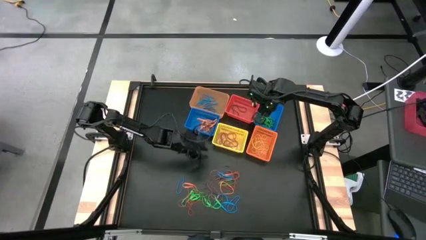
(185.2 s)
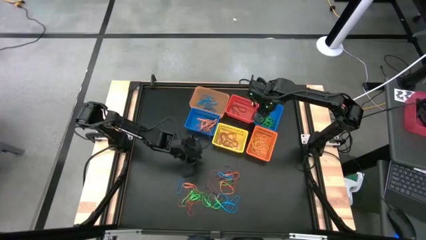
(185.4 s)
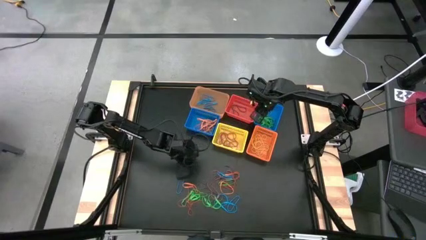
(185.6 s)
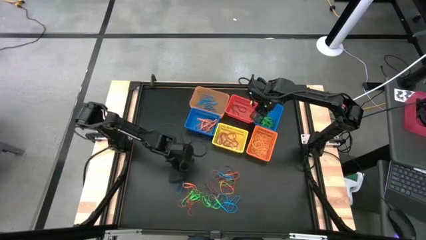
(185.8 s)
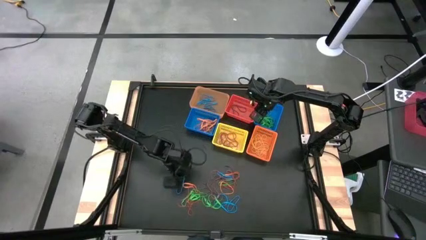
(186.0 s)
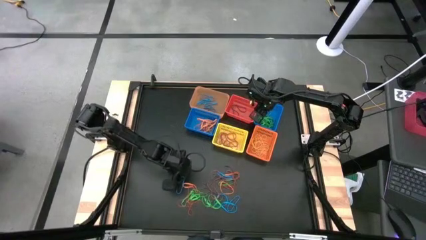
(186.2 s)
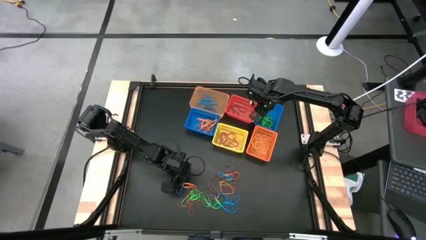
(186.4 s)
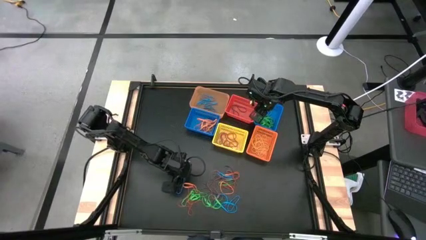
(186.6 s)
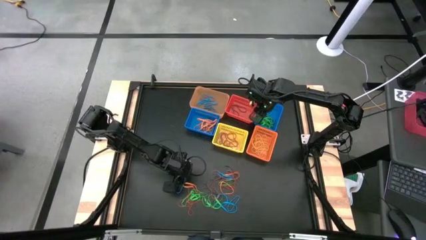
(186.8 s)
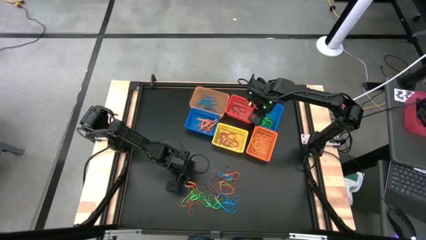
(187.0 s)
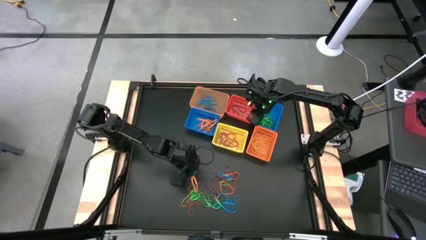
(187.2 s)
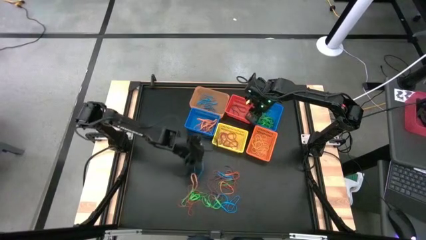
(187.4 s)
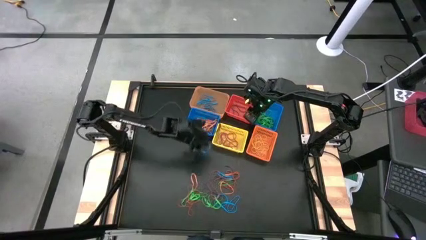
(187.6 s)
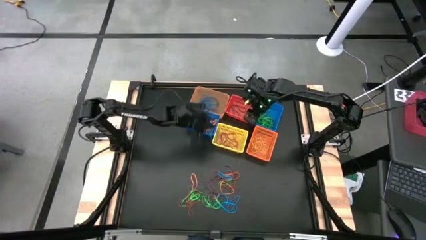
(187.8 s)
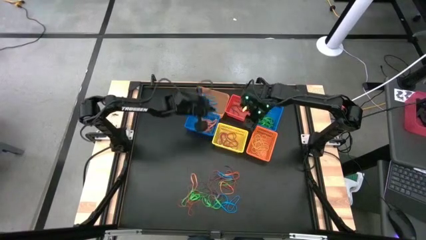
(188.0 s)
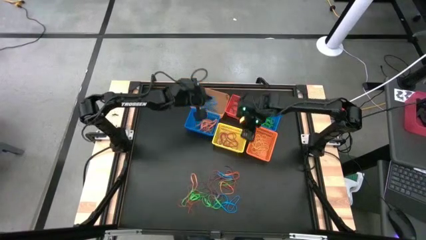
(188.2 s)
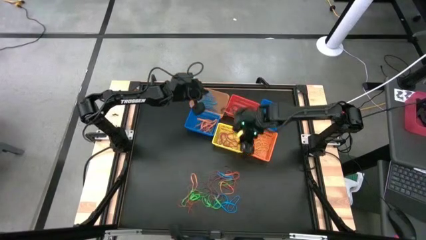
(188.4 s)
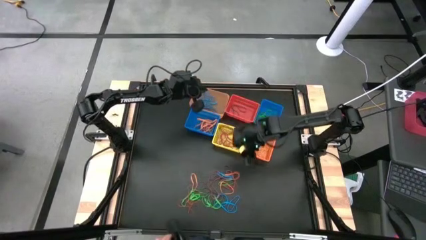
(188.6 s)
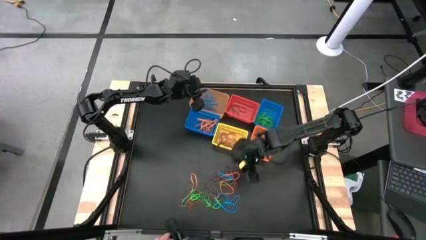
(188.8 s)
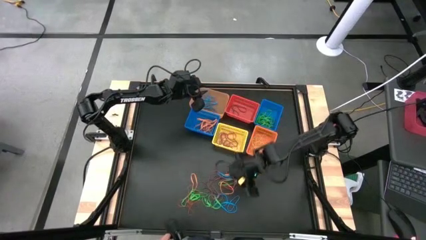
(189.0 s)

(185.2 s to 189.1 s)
Task: Sort rubber bands into baskets
Put the blue rubber band into the transparent orange basket

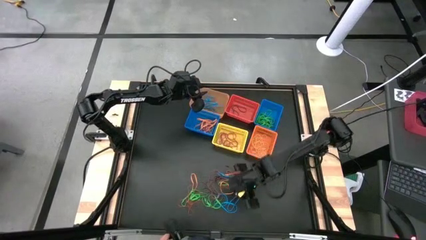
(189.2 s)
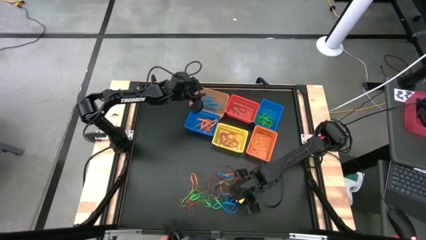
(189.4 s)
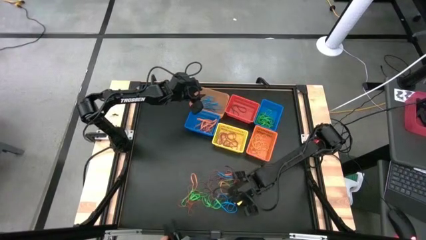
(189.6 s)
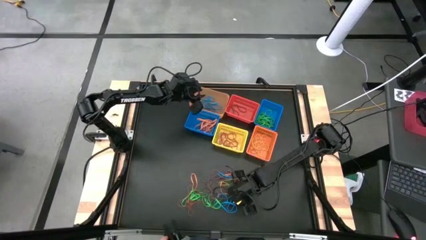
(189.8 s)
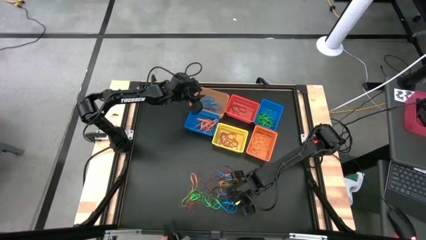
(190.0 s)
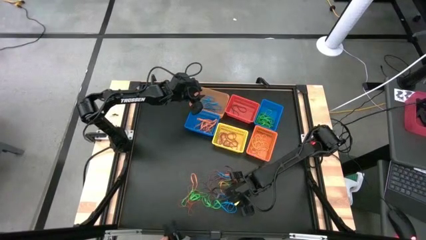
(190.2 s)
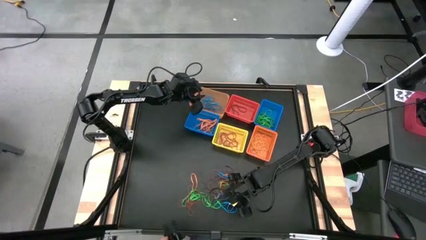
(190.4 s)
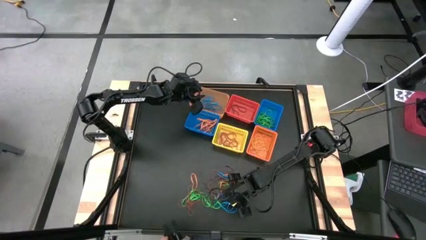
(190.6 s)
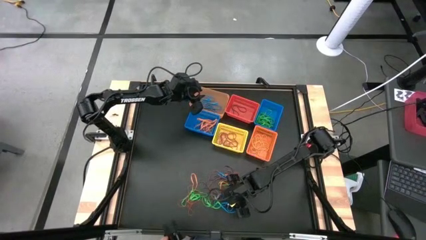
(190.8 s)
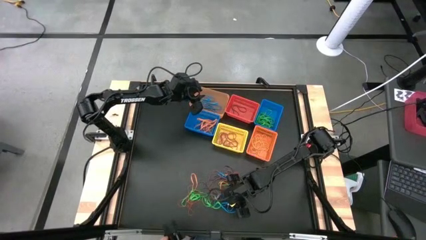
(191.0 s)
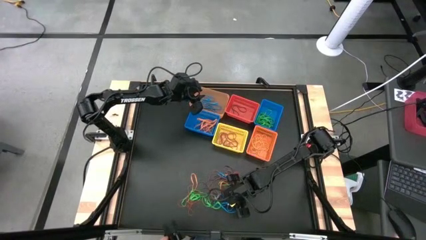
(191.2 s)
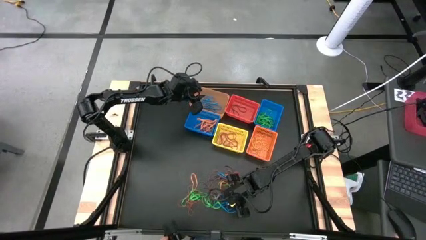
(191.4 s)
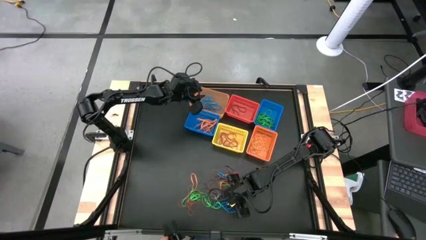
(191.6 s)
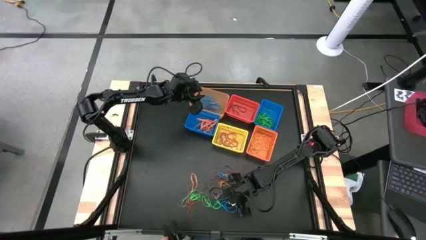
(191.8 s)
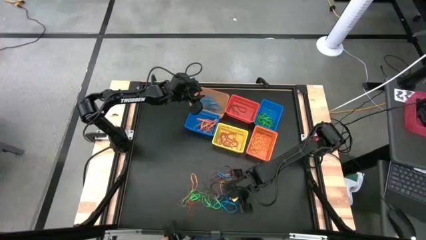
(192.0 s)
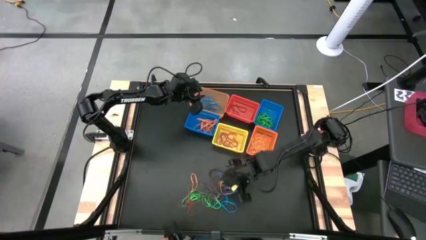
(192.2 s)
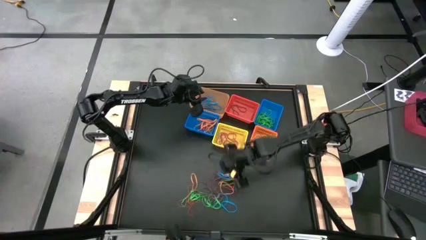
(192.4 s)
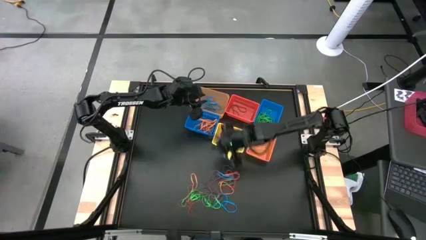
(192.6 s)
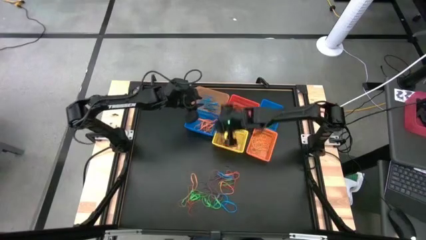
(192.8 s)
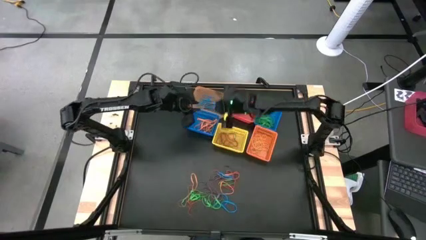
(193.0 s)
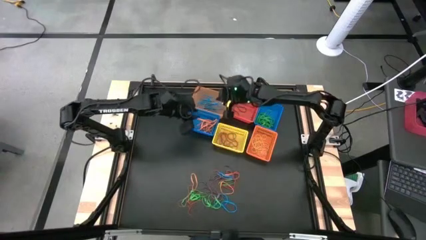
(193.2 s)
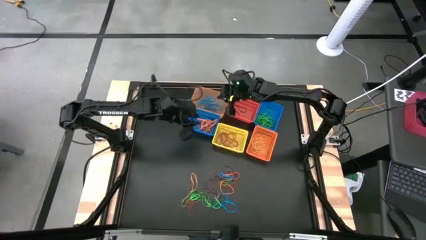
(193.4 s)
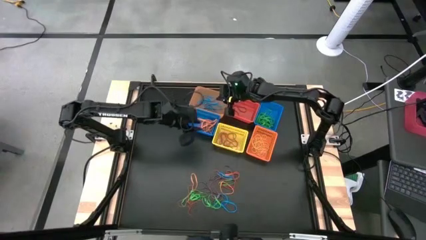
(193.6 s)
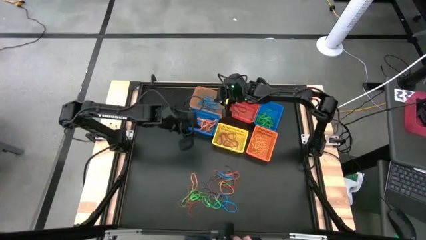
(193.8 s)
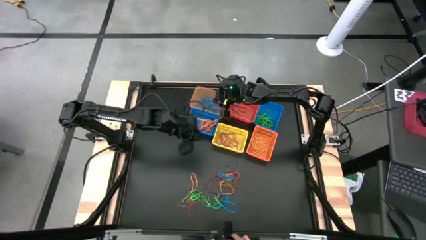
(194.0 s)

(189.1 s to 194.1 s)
Put the blue rubber band into the transparent orange basket

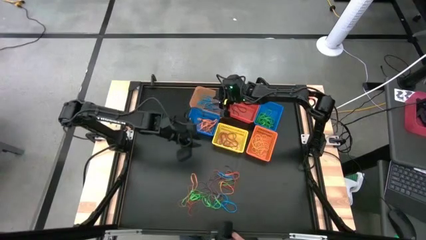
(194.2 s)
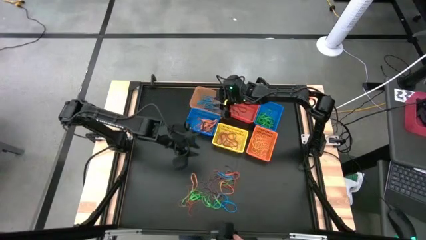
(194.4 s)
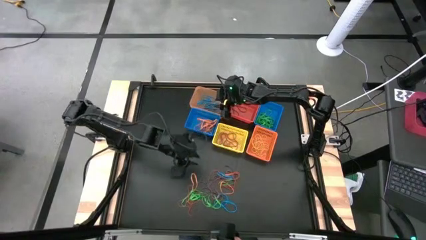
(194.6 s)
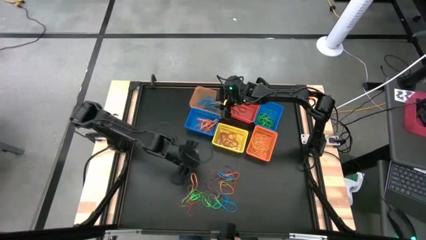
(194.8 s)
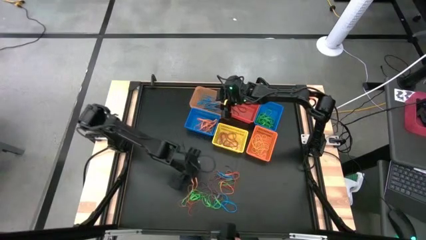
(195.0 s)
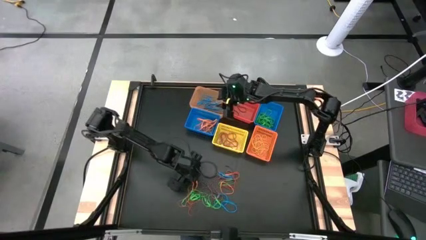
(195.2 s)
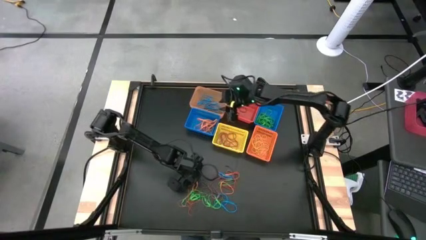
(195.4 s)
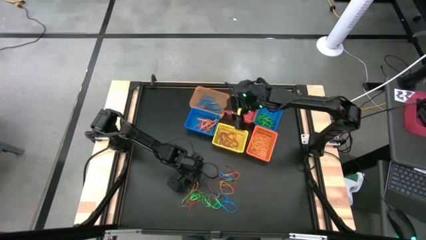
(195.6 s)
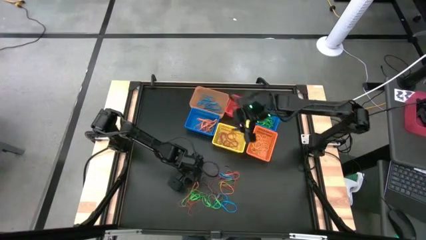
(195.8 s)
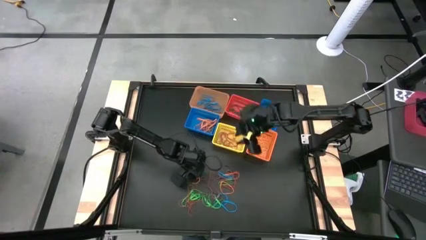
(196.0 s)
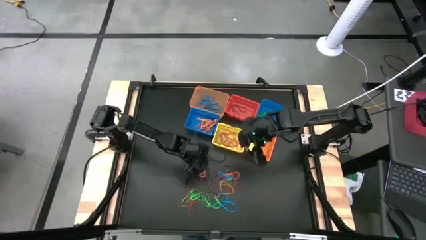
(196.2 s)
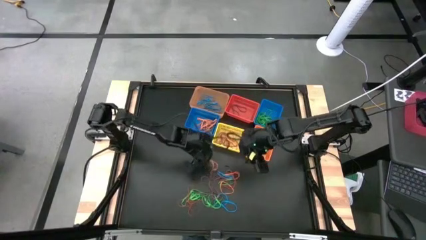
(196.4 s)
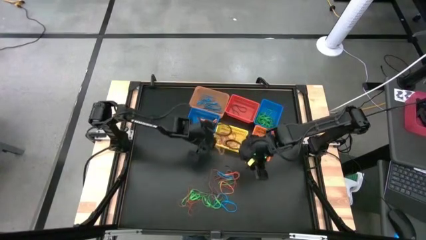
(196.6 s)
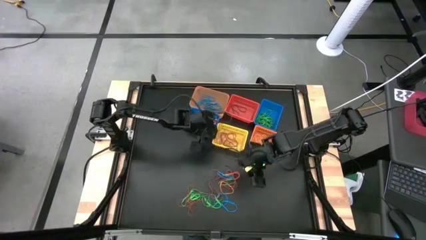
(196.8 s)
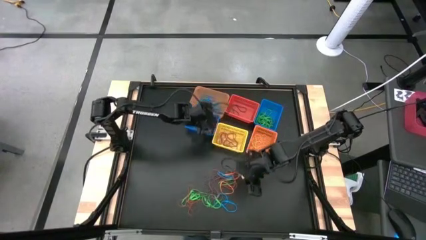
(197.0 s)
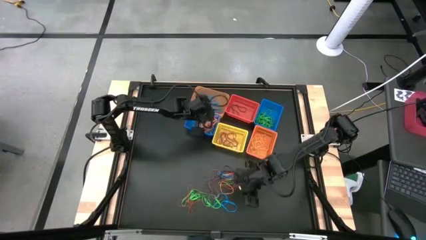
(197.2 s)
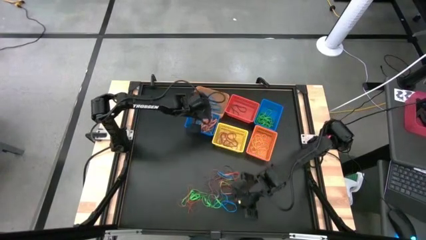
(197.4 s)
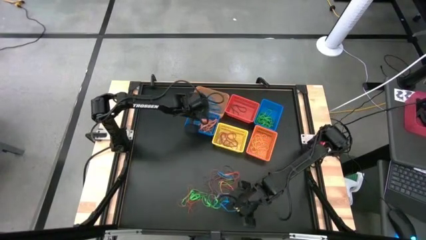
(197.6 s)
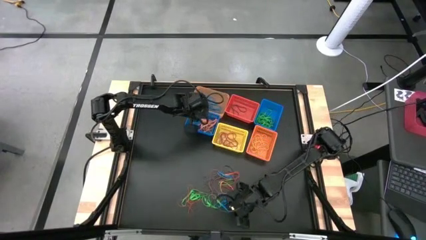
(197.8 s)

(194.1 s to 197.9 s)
Put the orange rubber band into the left blue basket

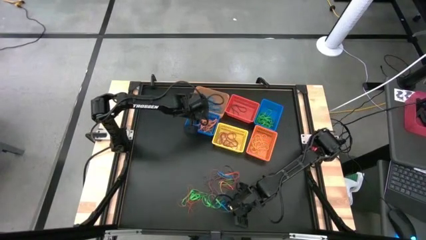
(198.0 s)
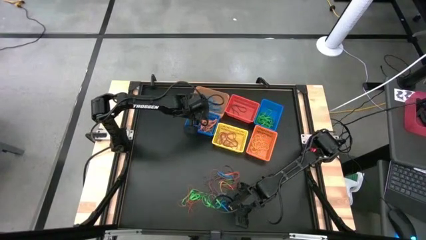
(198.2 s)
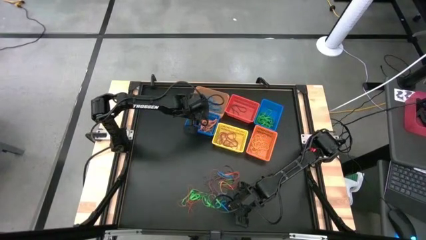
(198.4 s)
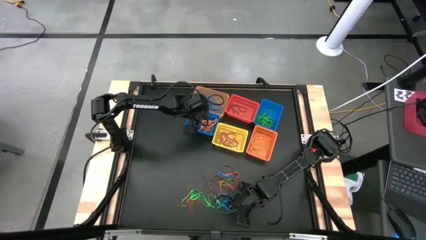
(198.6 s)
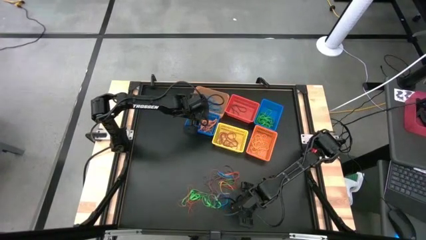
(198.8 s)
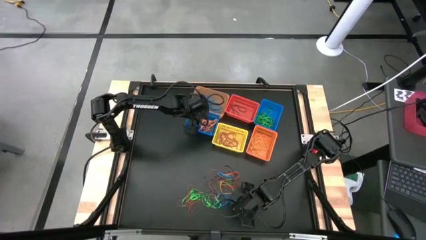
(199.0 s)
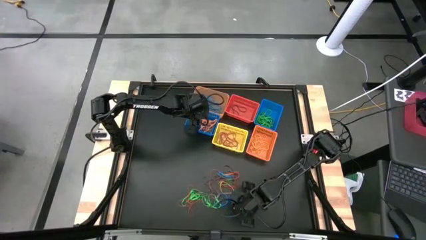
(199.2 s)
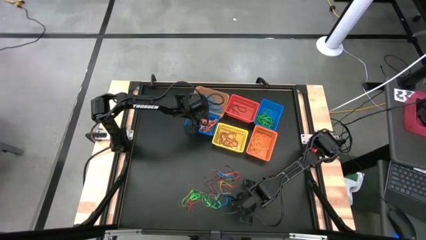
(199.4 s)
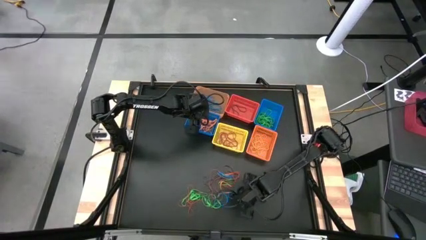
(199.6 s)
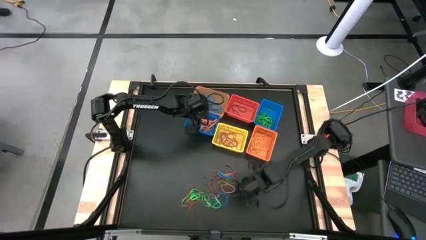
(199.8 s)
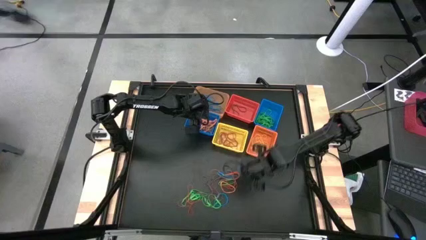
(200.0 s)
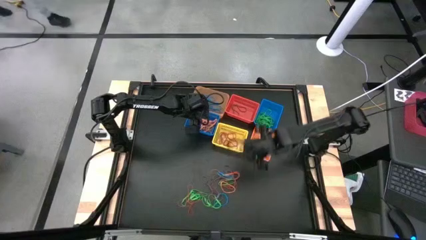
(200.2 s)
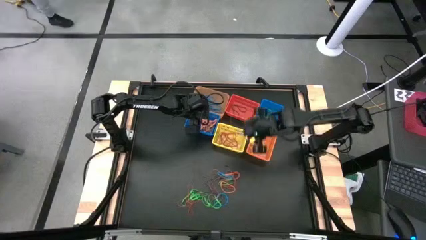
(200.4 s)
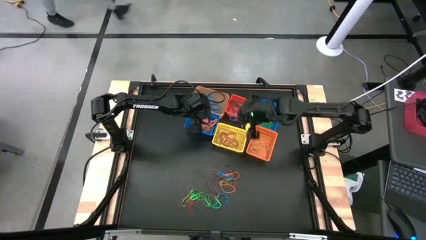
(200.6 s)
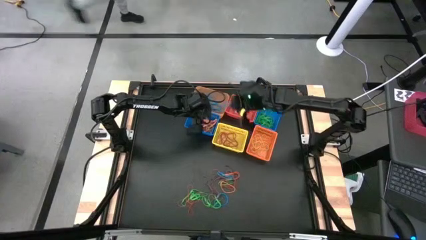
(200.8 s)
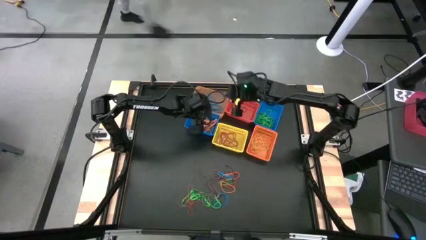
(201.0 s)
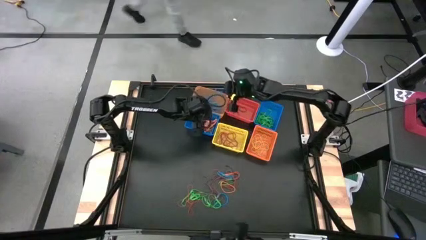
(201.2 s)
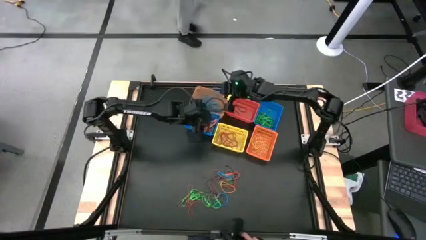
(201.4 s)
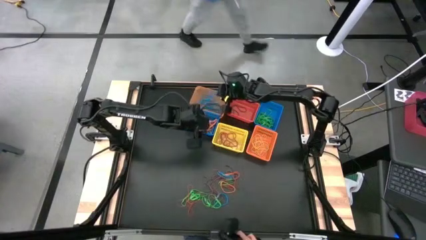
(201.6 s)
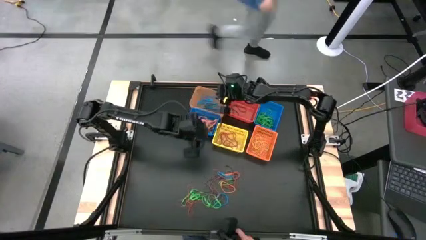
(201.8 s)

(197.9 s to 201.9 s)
Put the blue rubber band into the transparent orange basket
